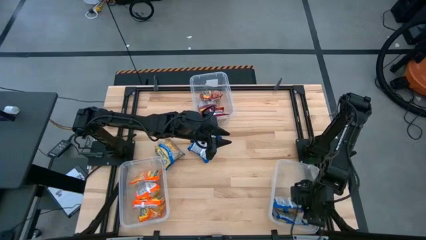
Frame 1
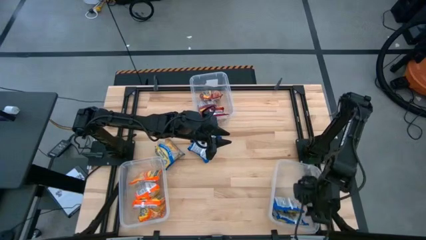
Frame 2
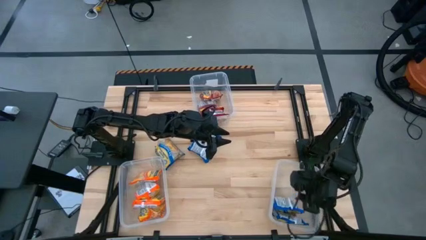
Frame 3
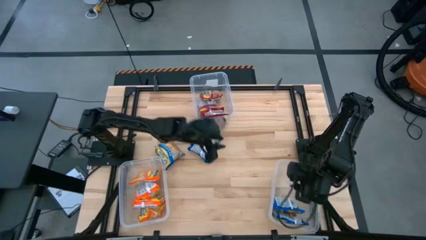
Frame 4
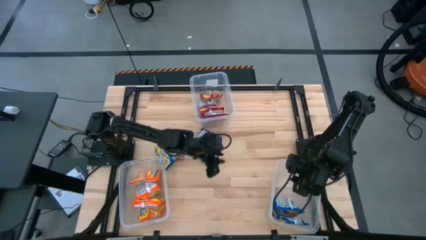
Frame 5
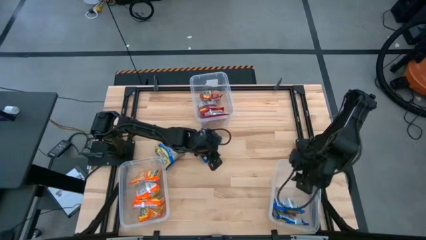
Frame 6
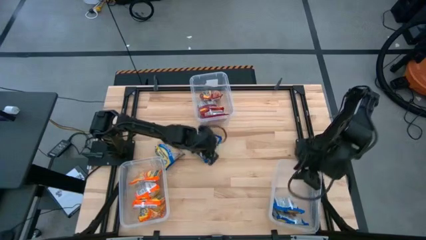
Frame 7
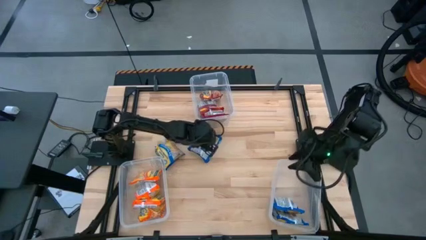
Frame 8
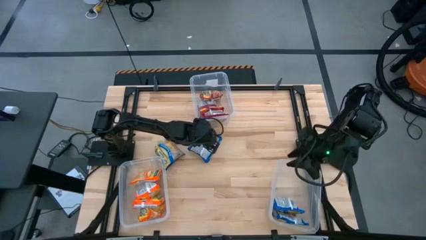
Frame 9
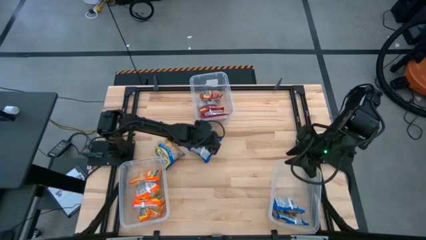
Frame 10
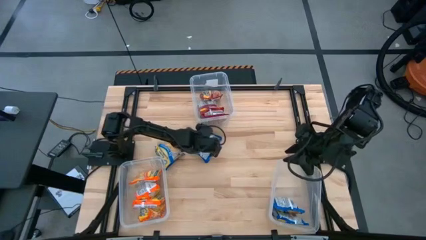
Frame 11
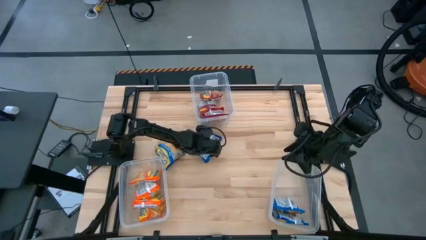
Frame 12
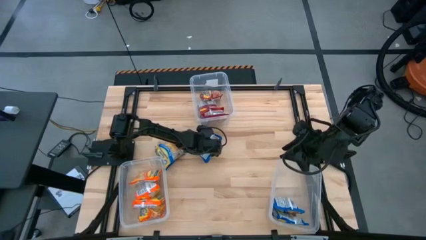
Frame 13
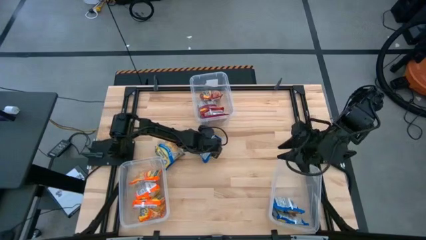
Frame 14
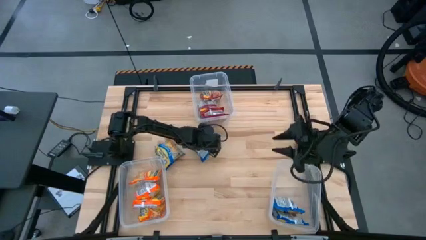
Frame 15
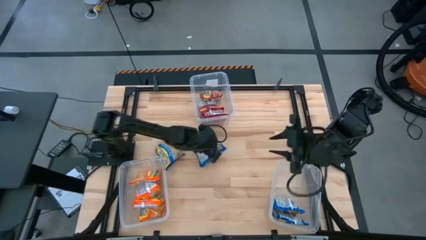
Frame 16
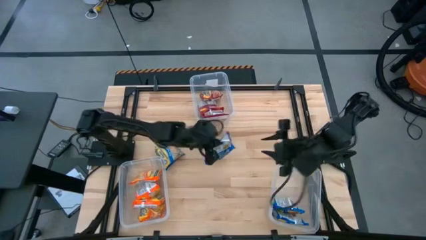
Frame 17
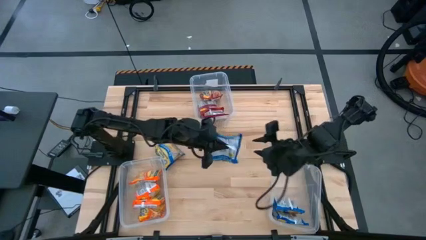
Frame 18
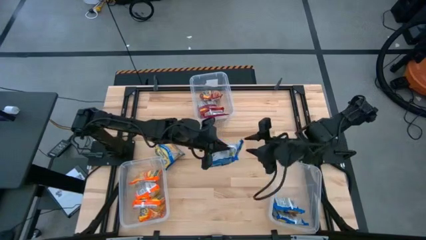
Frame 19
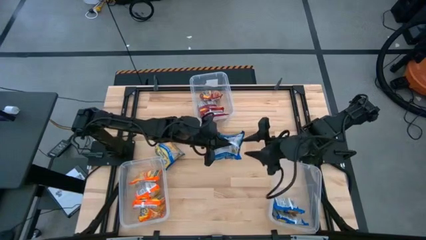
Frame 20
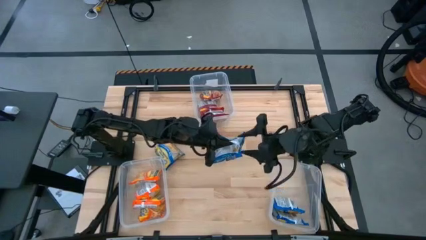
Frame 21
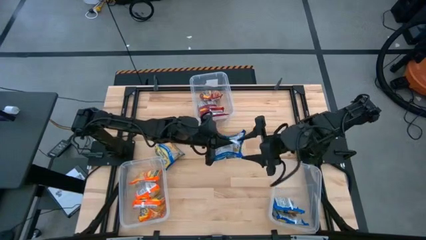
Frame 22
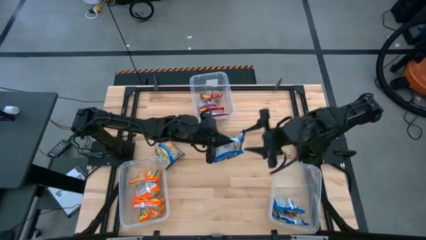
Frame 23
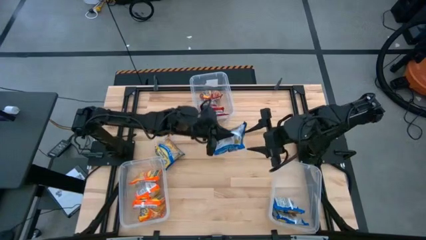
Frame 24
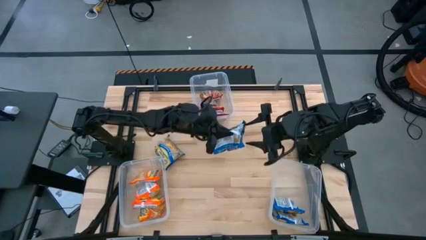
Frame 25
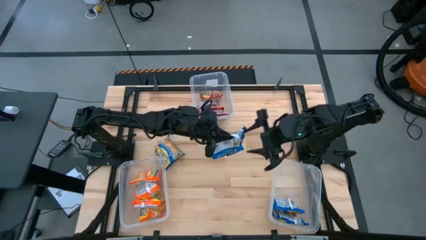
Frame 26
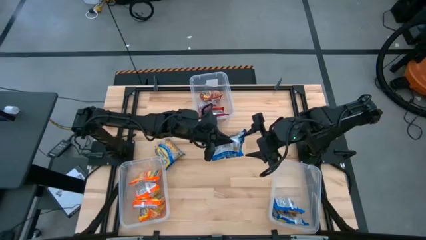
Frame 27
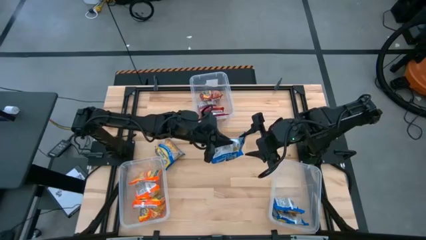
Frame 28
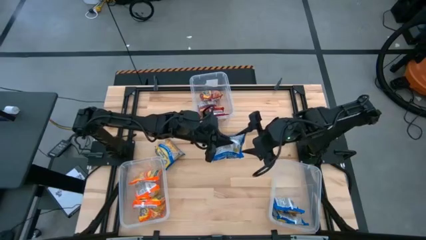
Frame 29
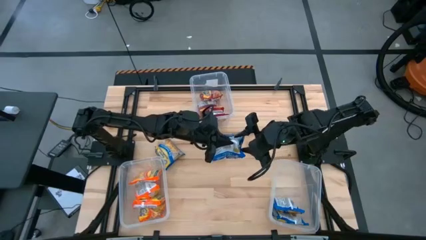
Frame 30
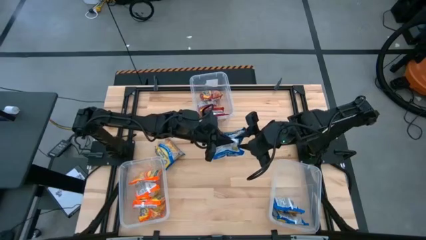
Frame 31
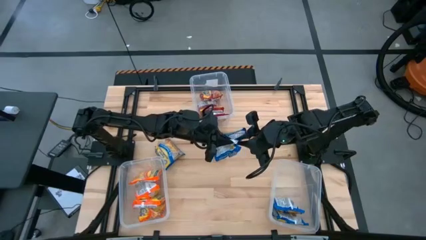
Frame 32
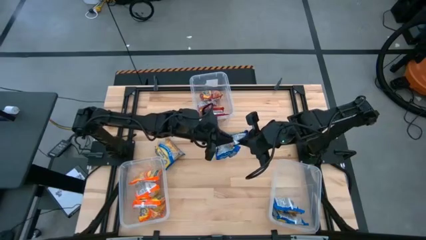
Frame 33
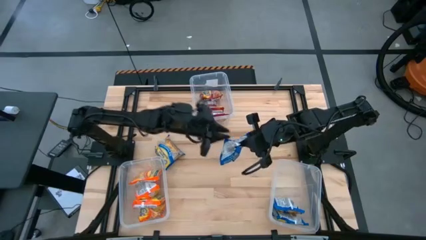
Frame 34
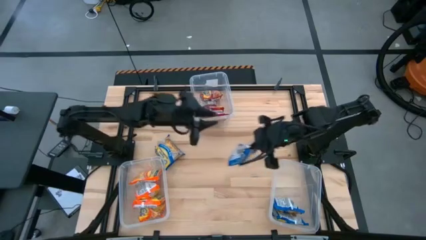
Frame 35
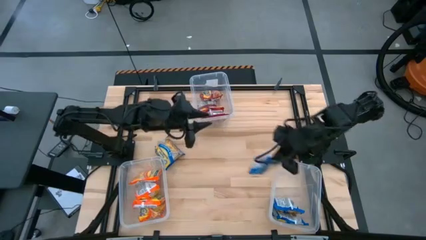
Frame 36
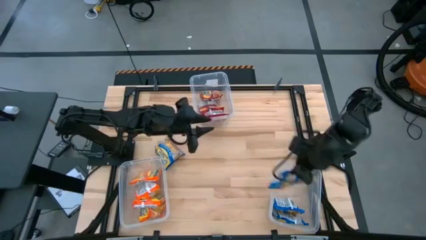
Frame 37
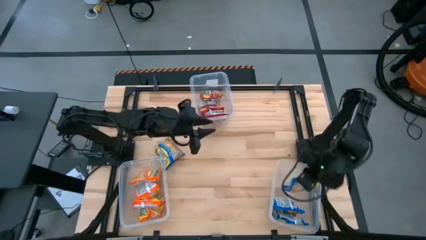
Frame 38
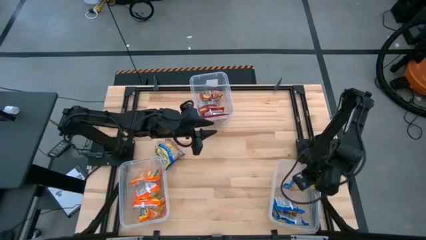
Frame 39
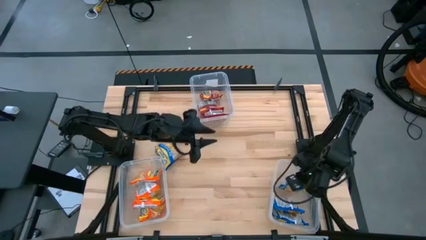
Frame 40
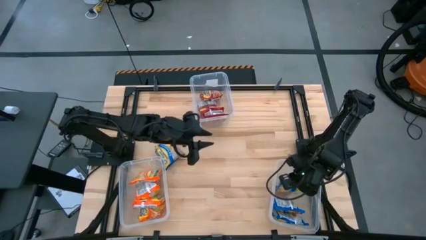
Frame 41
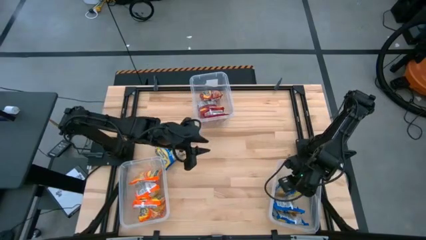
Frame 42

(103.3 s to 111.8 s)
Task: Sort Maruchan noodles
Put the blue noodle pack into the bottom right transparent bin

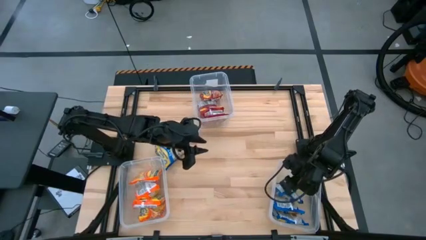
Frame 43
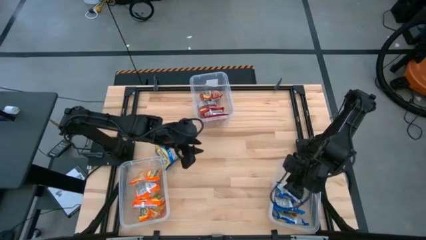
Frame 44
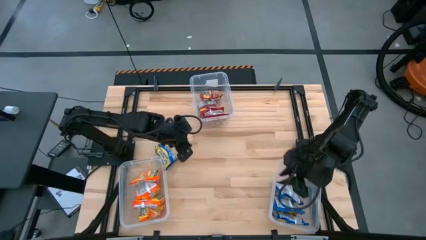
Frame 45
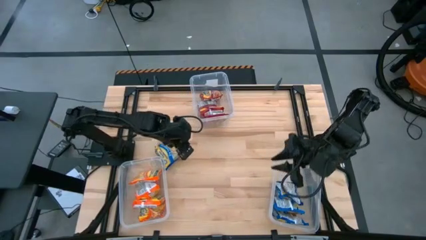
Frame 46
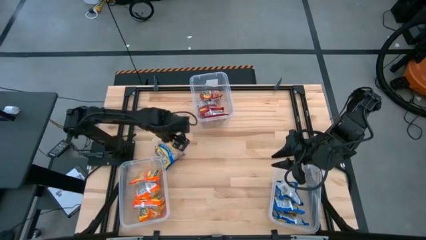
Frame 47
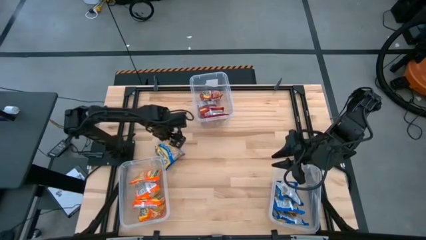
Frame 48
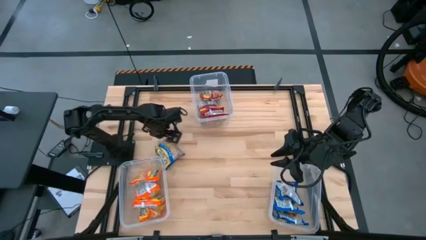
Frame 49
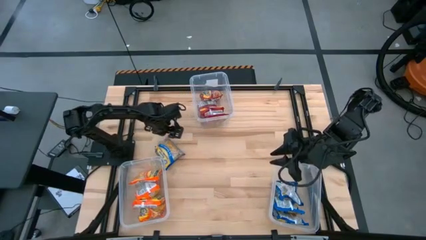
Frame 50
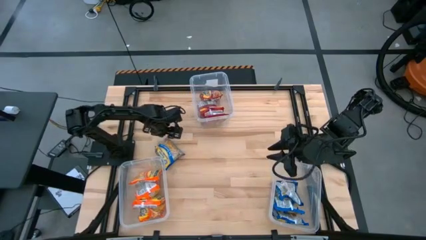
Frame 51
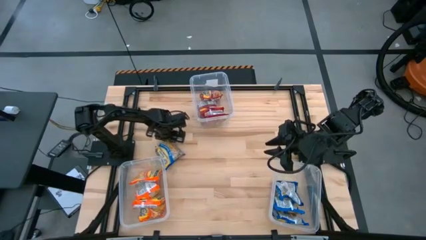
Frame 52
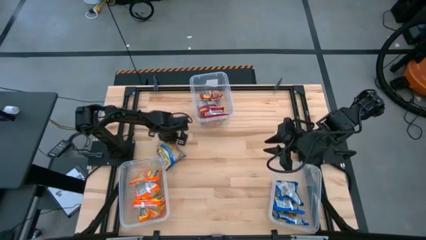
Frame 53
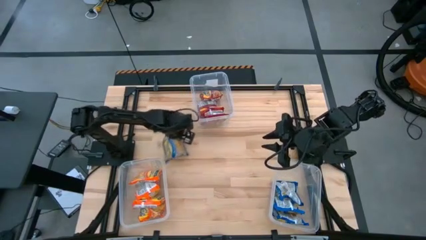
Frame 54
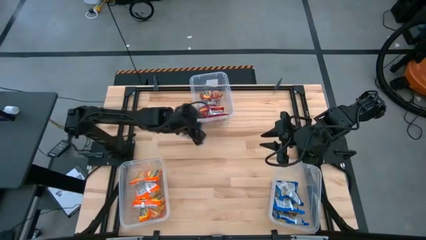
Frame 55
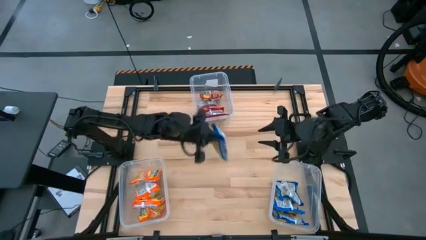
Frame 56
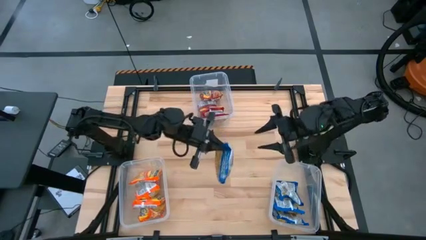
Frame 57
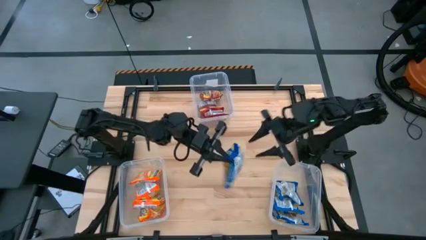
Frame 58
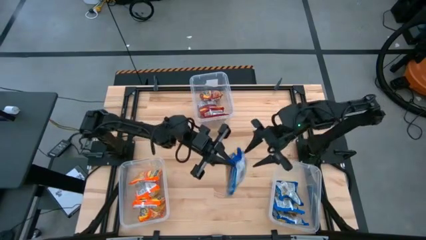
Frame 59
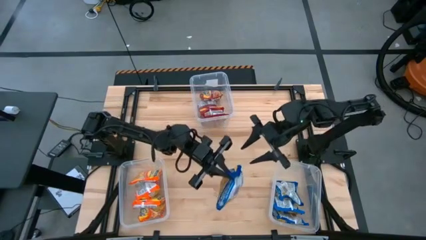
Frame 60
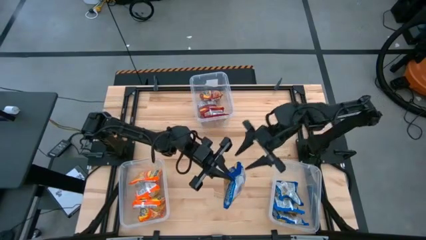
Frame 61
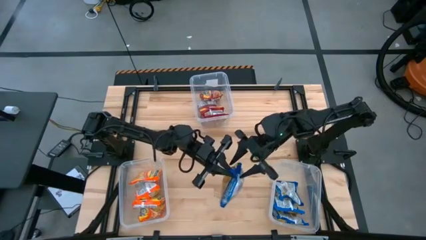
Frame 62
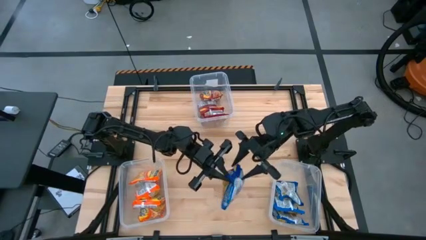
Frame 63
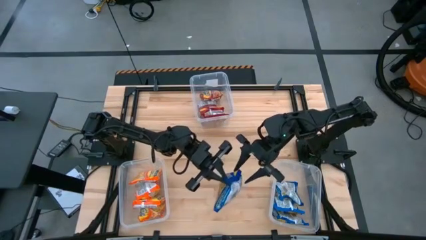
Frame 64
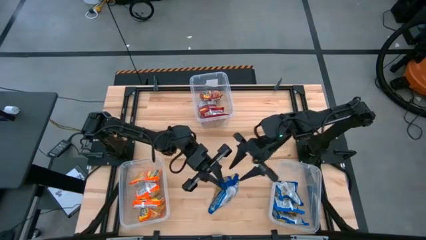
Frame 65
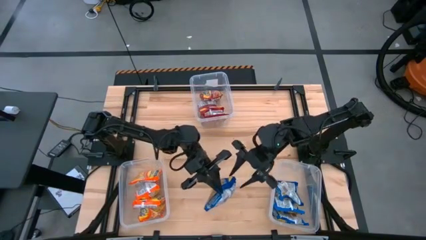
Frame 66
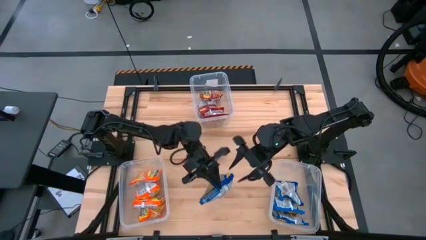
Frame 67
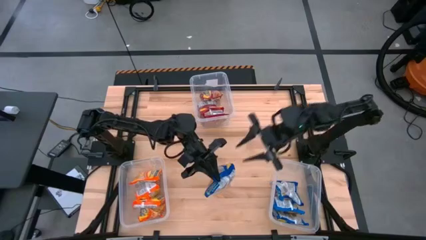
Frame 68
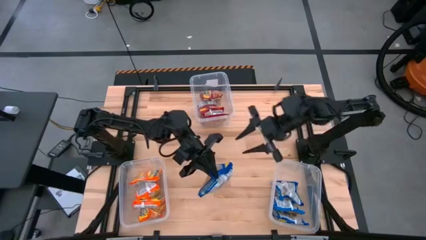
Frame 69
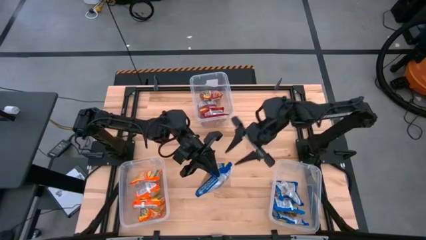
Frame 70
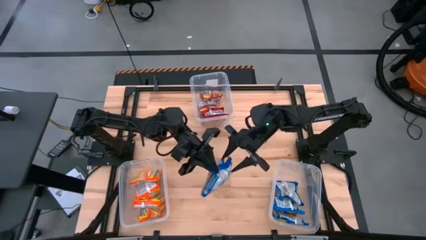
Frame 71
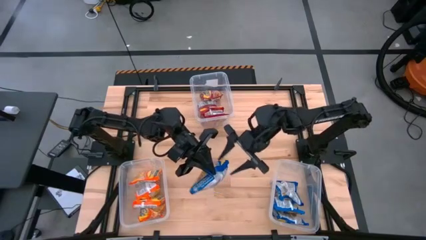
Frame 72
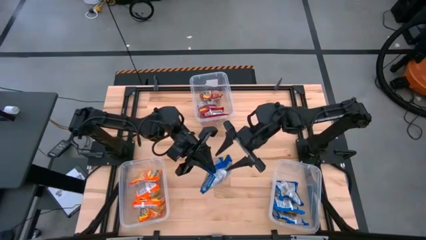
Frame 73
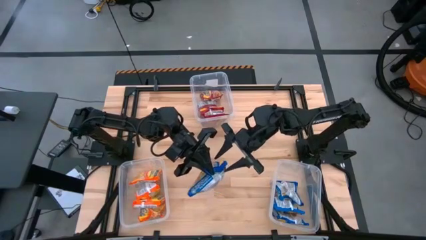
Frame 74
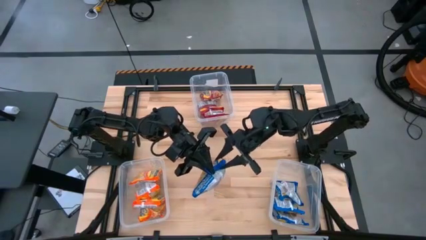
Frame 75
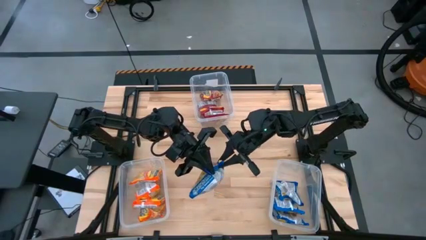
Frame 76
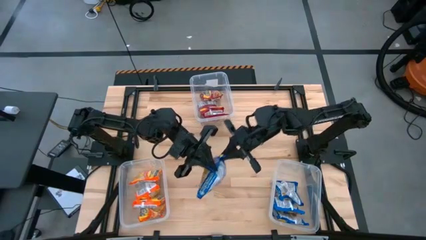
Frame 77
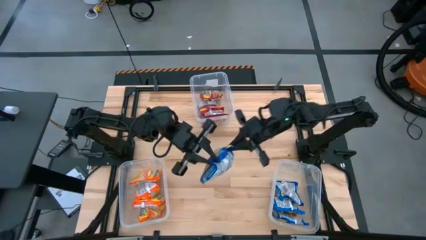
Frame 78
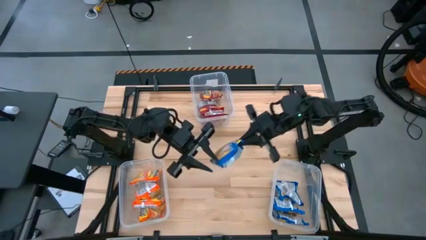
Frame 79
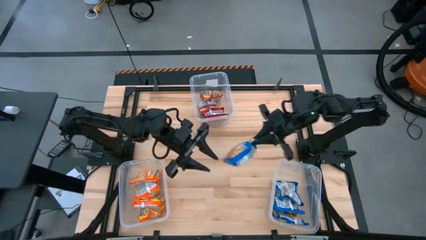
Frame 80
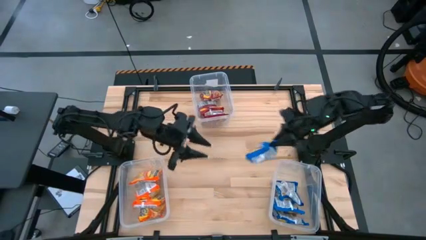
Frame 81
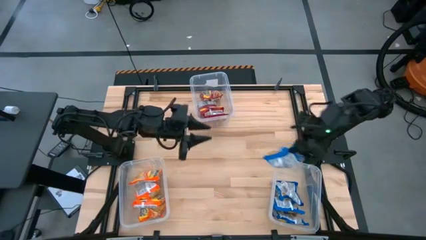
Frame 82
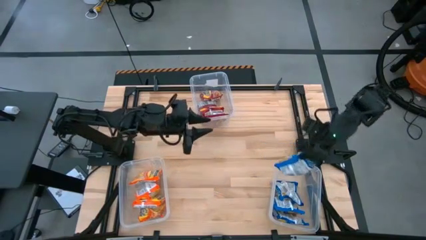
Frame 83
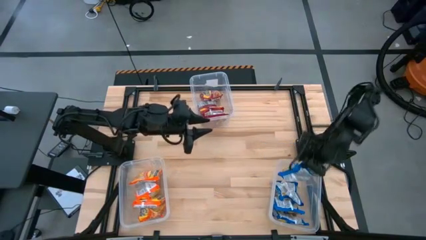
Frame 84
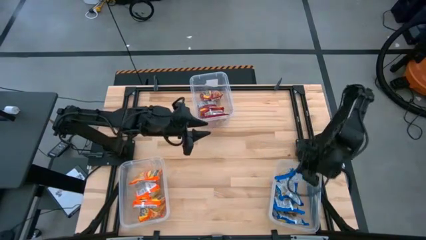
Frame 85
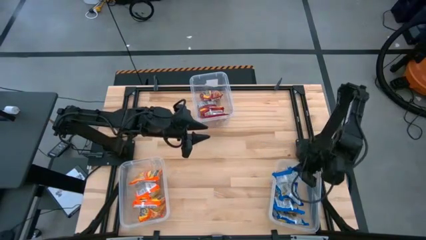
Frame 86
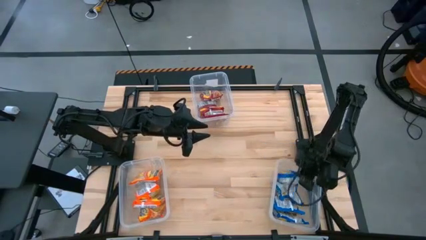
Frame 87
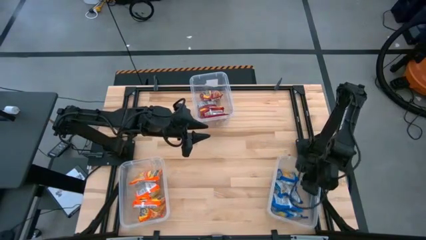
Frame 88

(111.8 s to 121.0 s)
Put the blue noodle pack into the bottom right transparent bin
